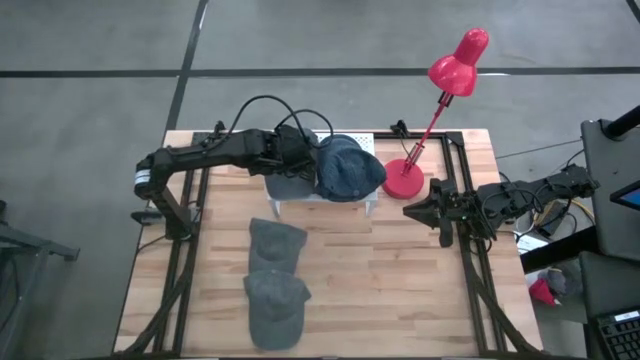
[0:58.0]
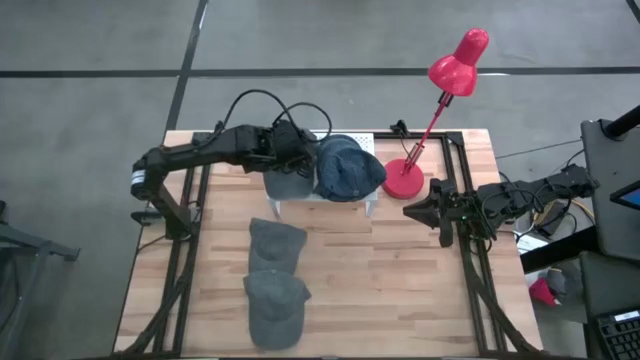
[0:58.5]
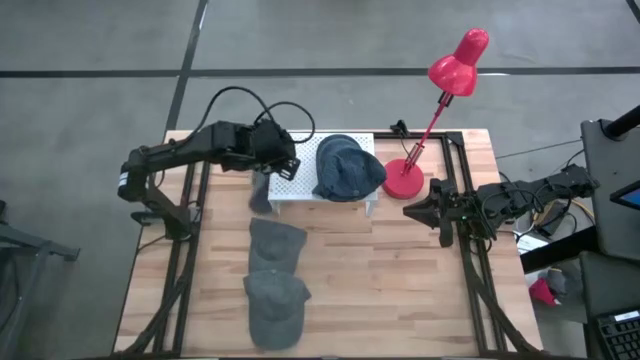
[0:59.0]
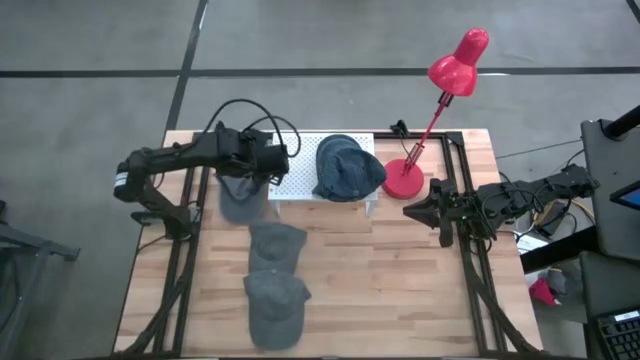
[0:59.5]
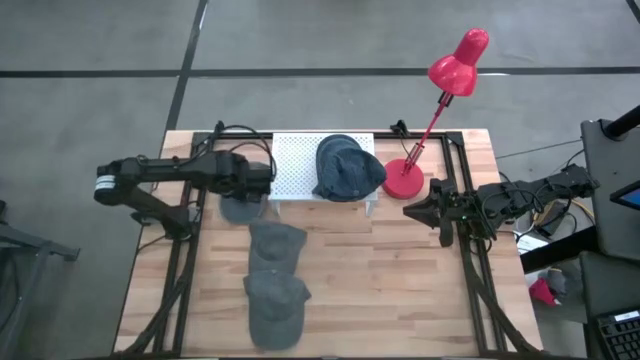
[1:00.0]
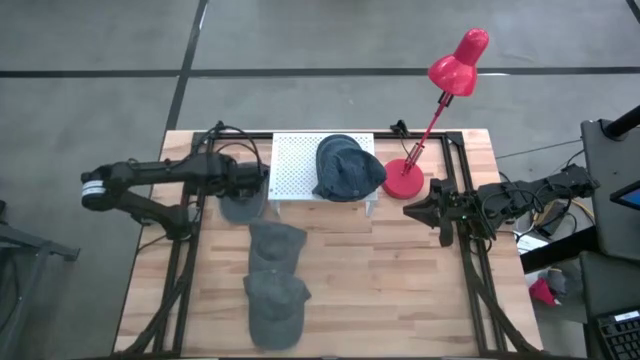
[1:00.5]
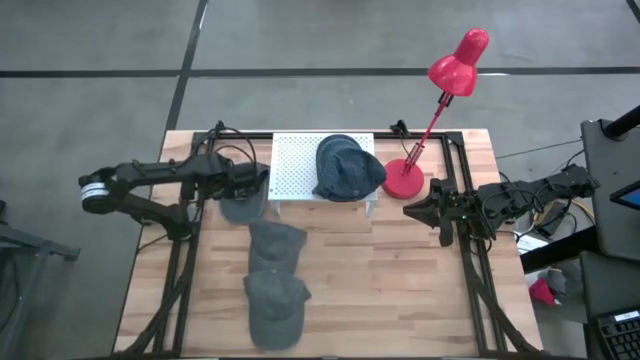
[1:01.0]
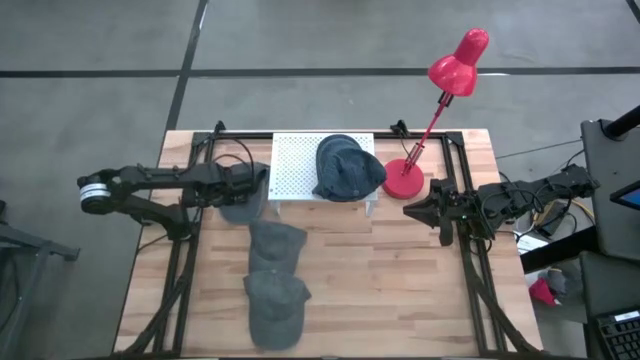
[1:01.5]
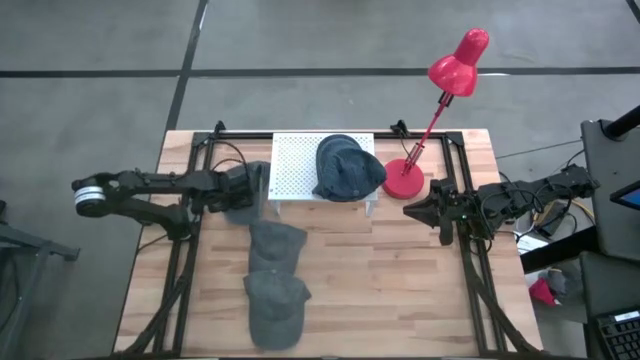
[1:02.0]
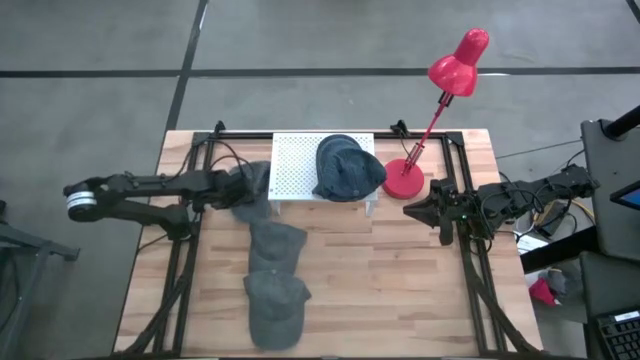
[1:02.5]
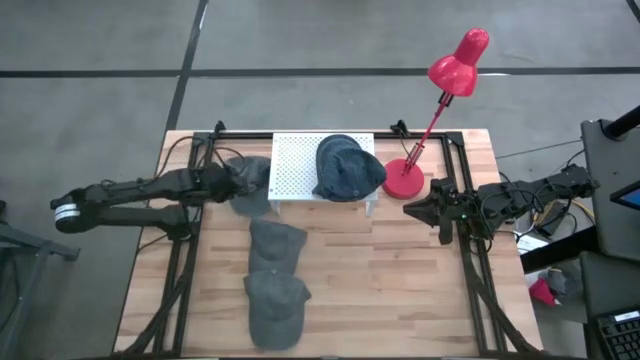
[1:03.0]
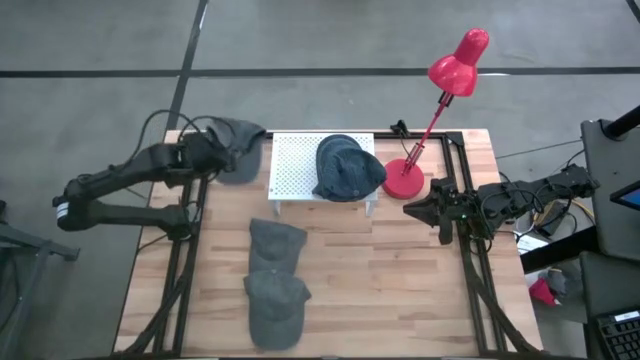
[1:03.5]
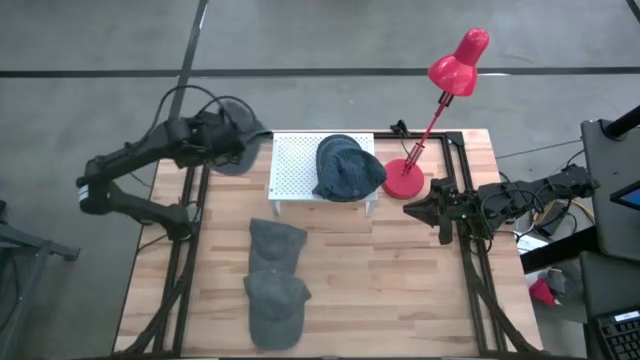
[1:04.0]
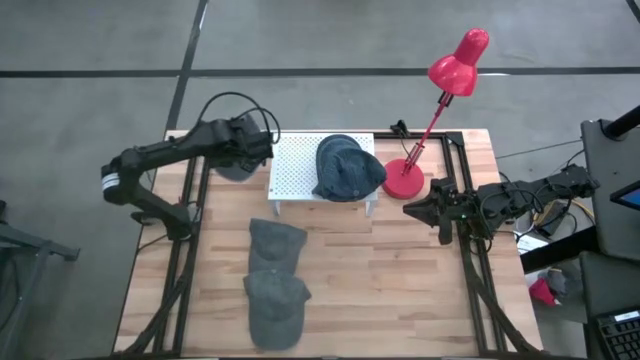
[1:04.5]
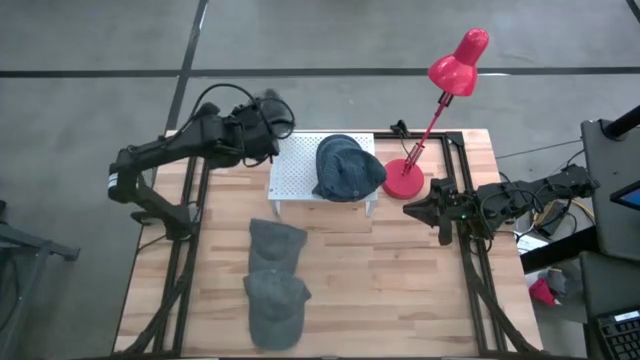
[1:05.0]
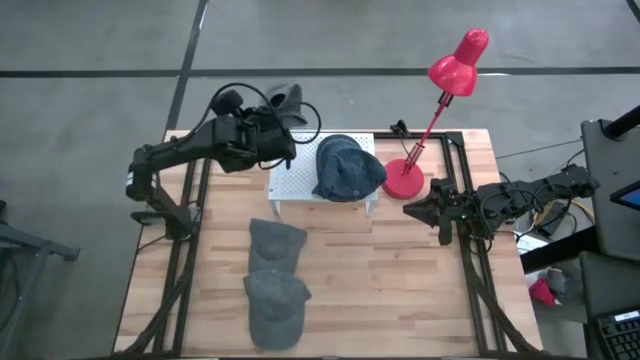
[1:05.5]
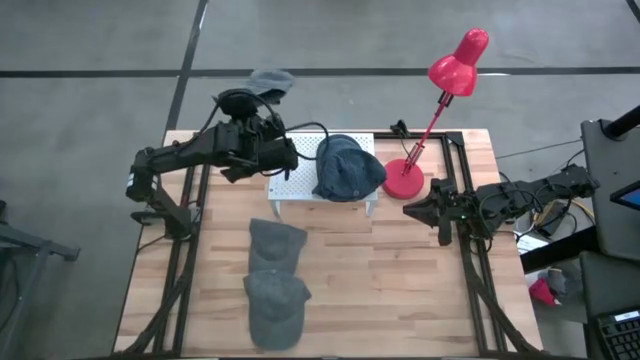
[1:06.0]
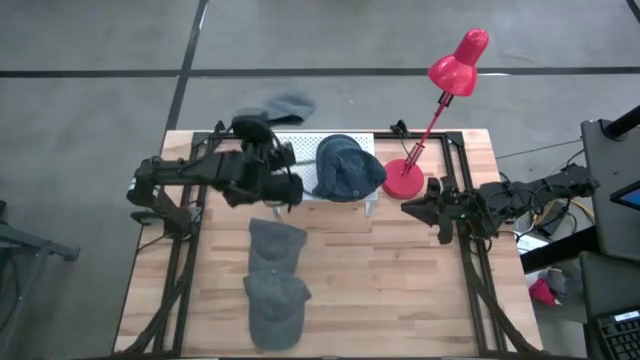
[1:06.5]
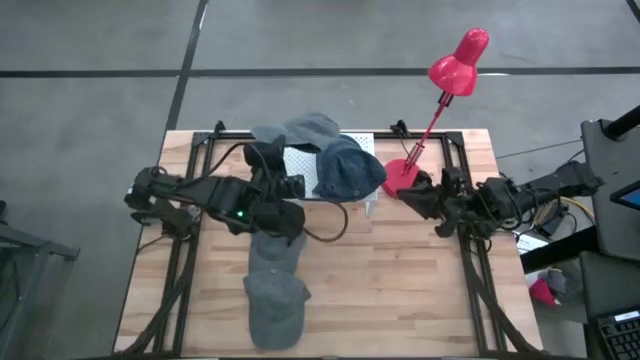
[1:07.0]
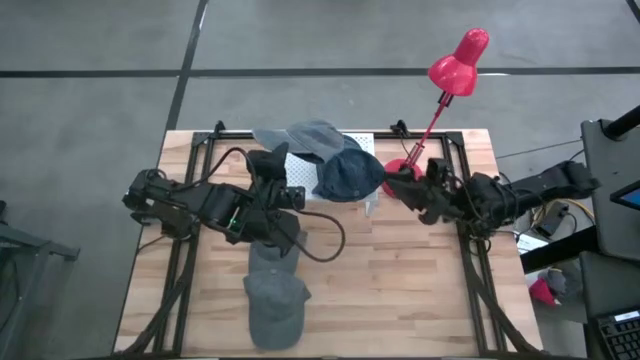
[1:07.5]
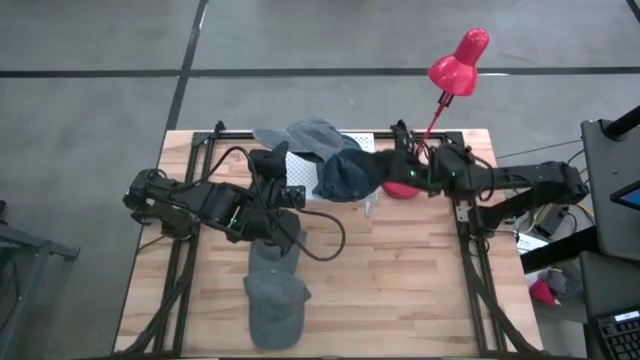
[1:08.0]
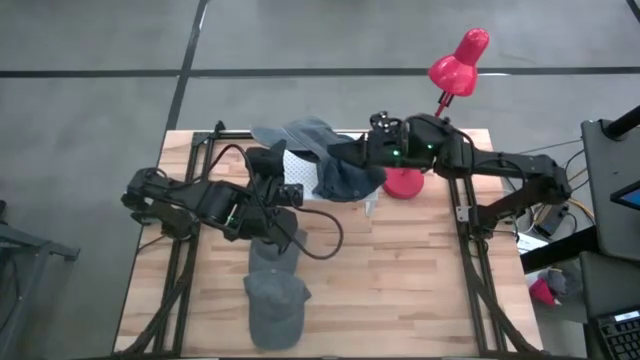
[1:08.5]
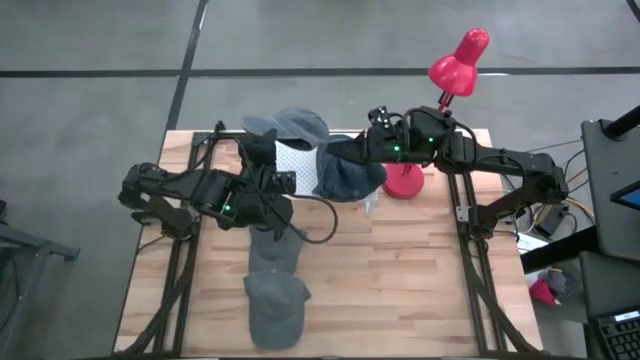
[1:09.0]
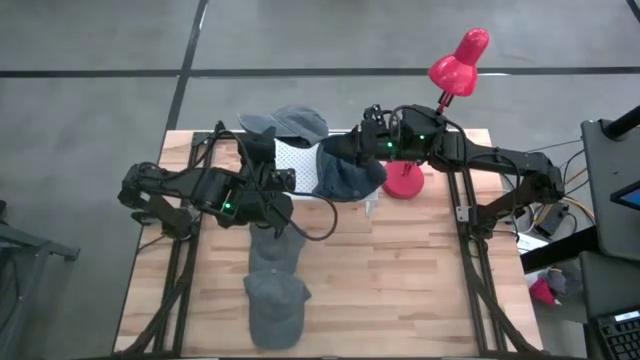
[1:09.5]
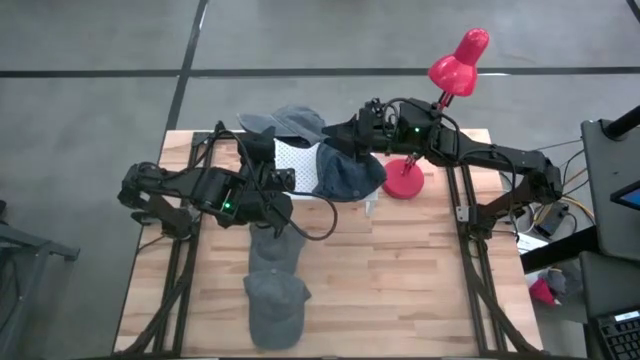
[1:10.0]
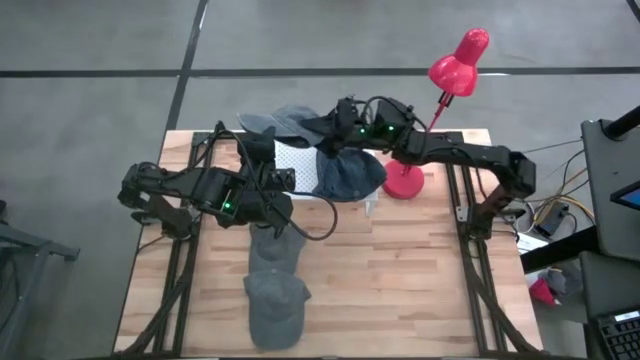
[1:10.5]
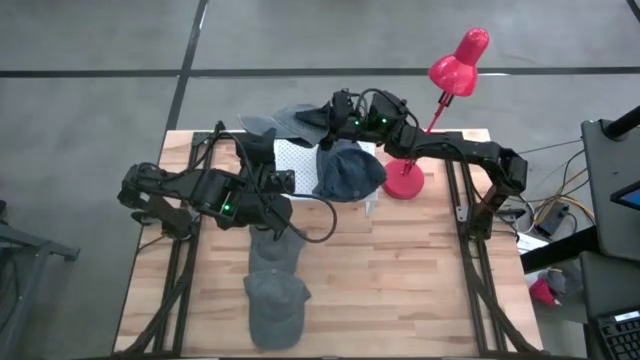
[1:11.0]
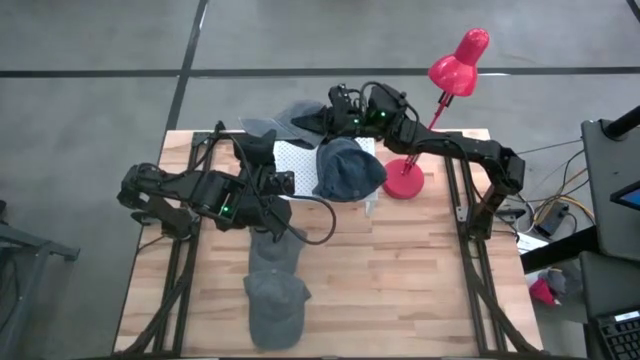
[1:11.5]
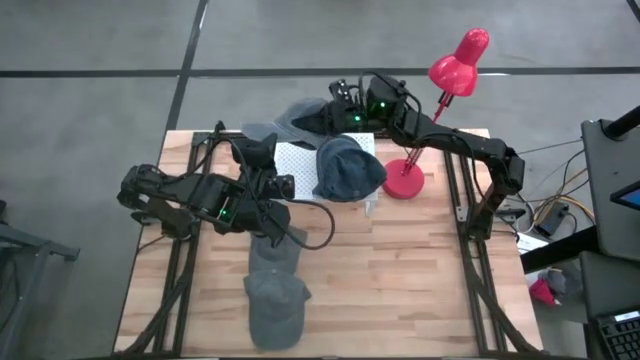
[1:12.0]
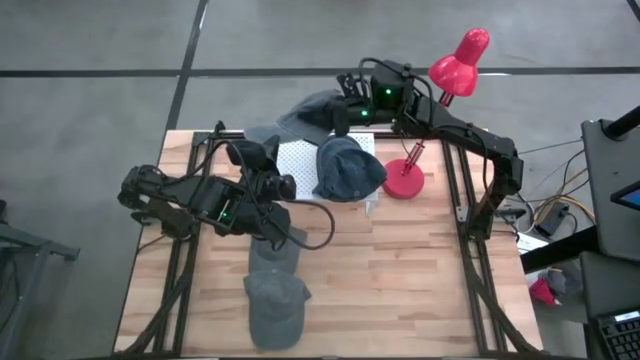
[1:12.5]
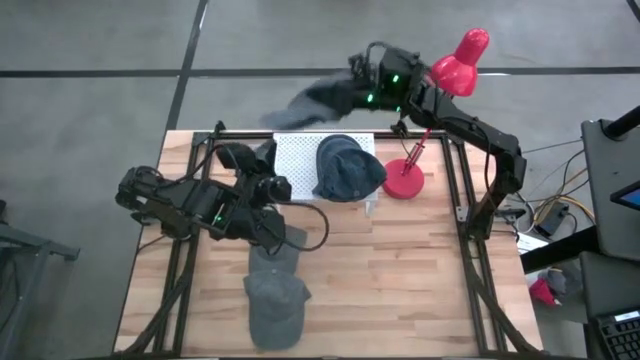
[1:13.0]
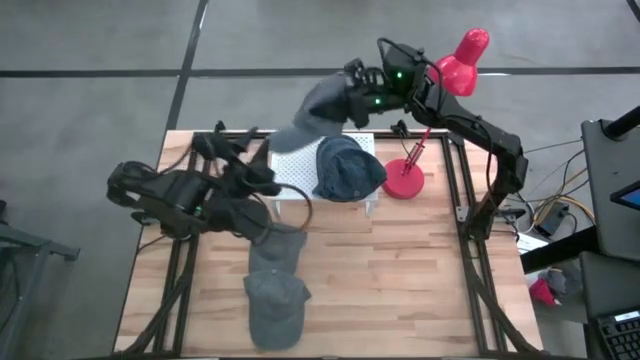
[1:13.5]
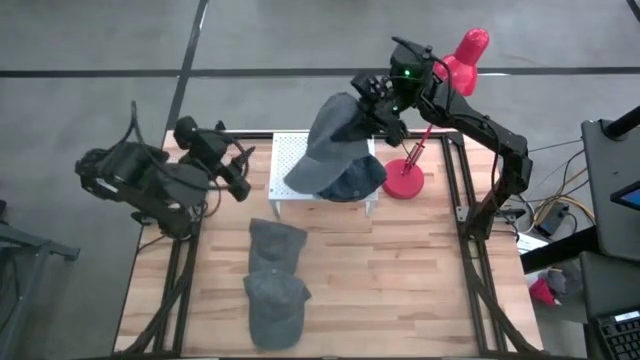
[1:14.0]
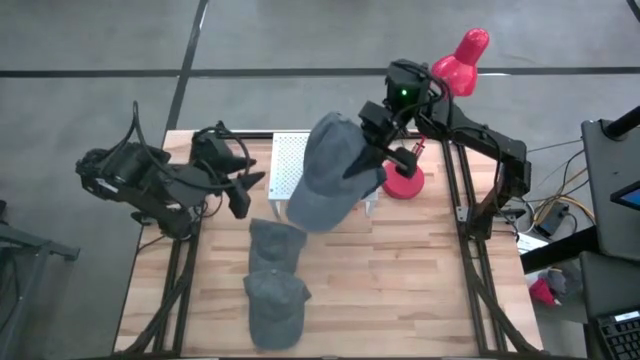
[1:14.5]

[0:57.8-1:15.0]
Task: Pick & Place hat
Put the left gray cap on the shelf

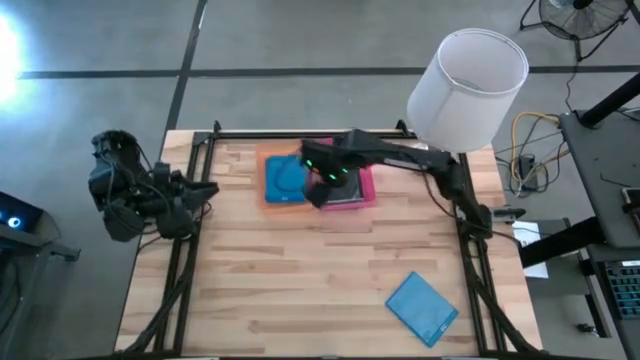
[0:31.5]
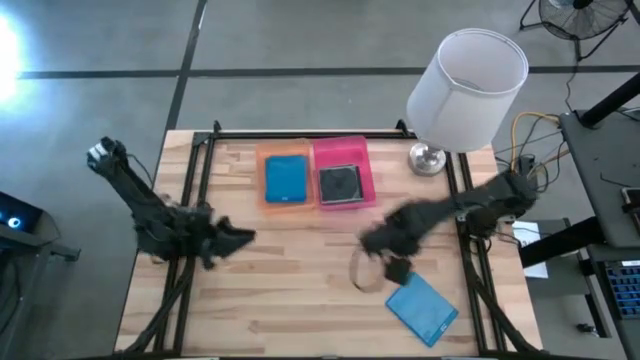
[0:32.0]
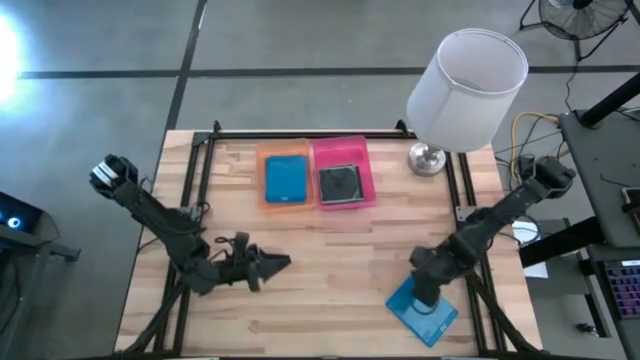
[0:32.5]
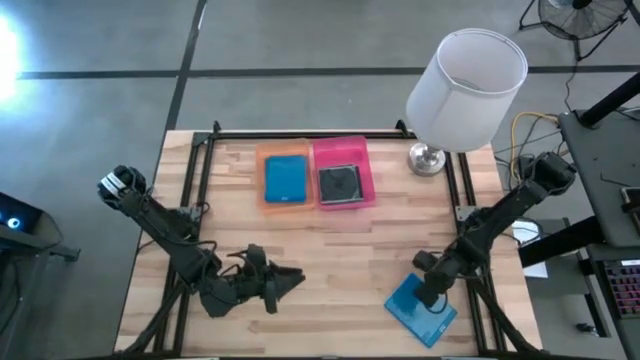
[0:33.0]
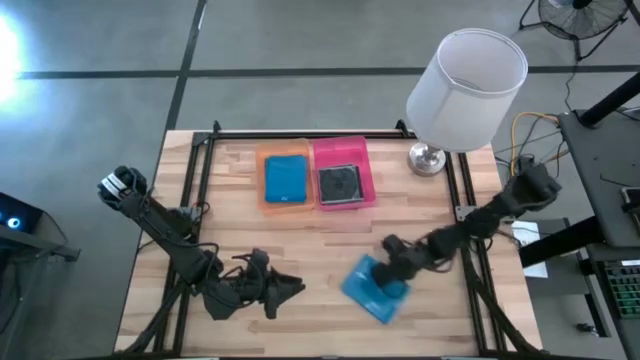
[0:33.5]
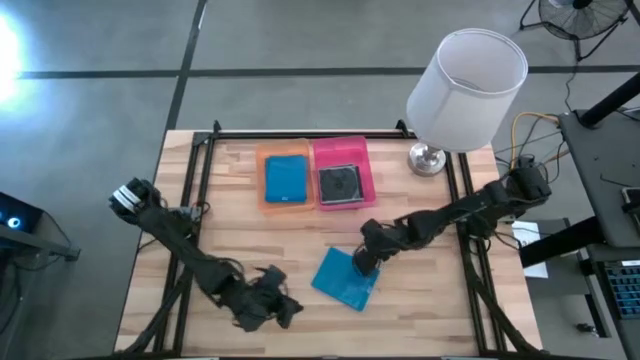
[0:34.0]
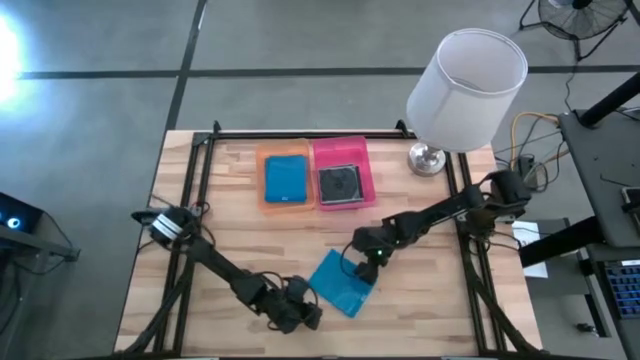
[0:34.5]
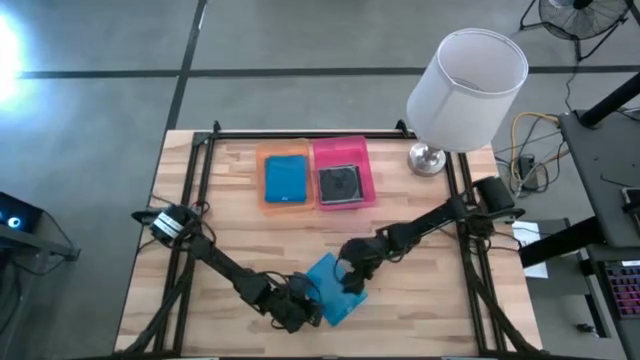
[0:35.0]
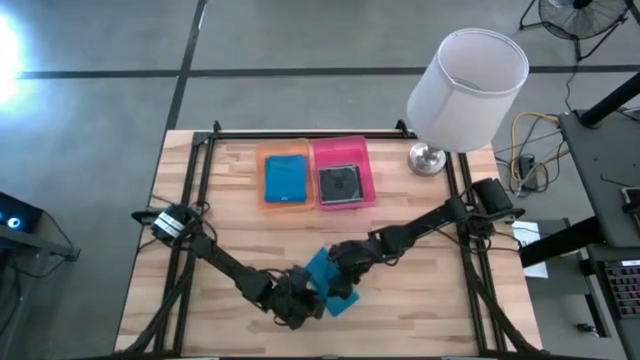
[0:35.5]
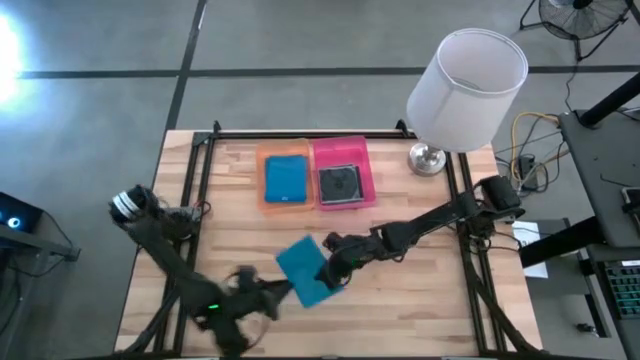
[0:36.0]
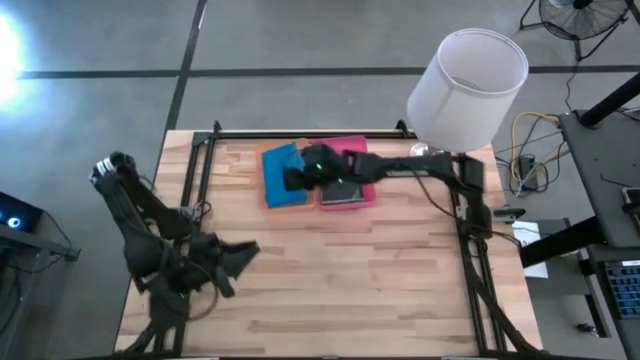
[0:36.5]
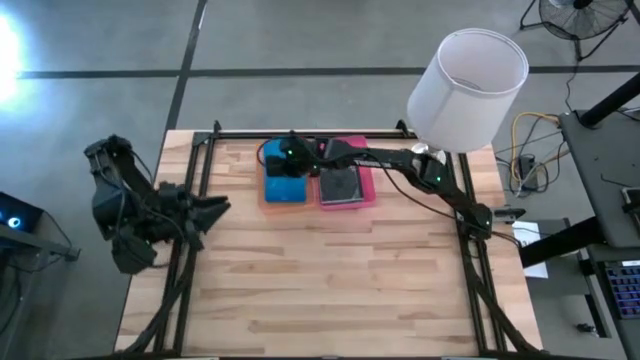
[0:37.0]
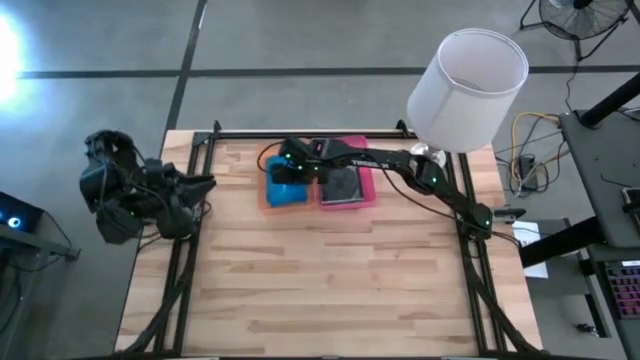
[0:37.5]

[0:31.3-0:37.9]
Task: Pick & place jewel cases by type
Put the blue CD case into the orange bin
